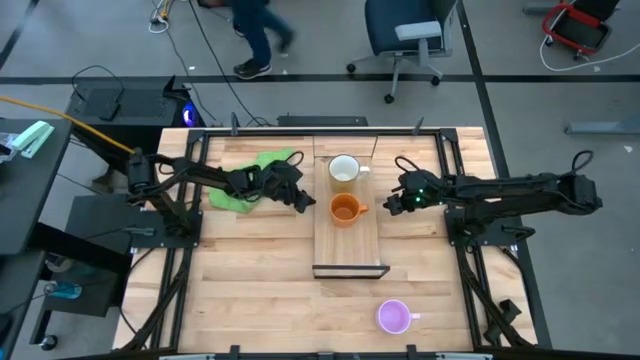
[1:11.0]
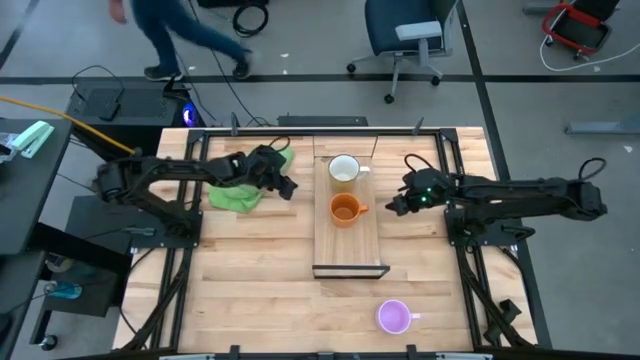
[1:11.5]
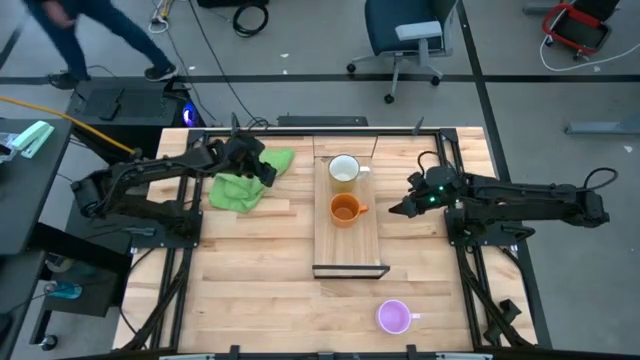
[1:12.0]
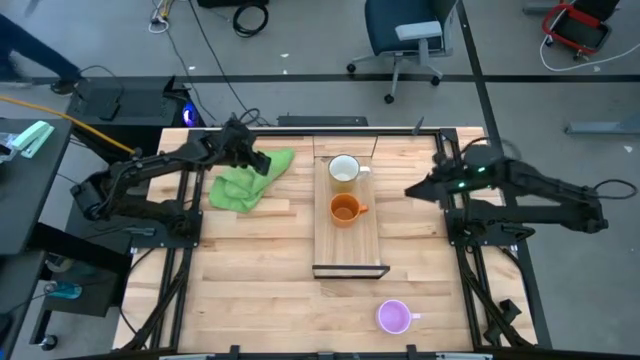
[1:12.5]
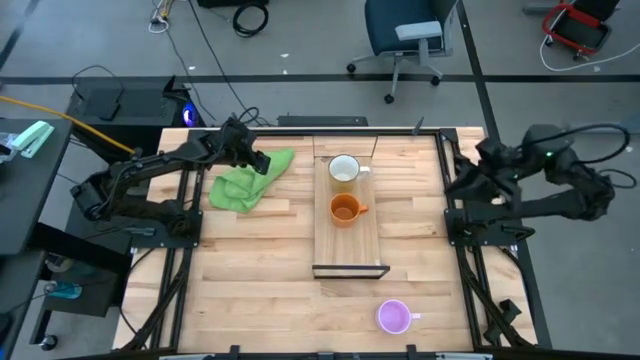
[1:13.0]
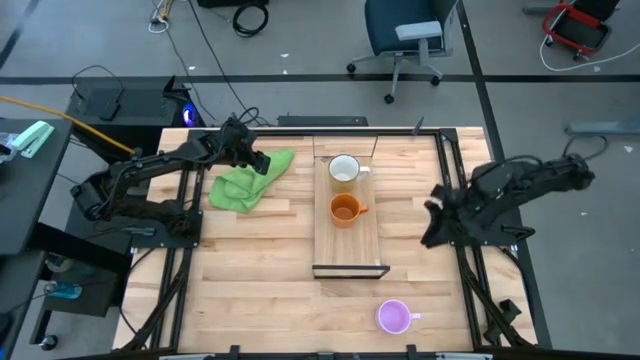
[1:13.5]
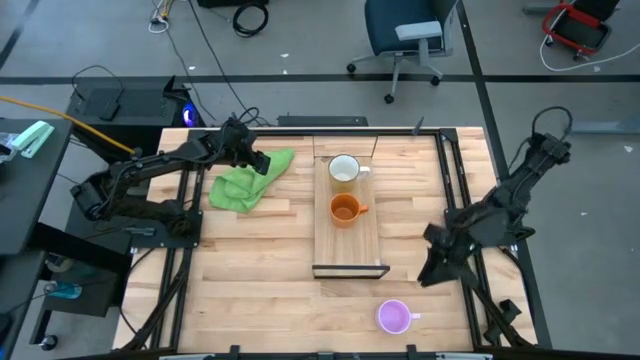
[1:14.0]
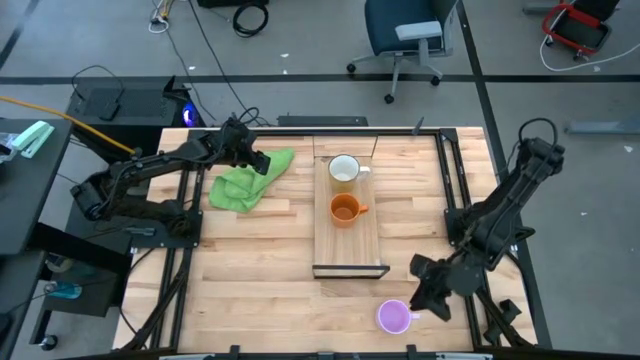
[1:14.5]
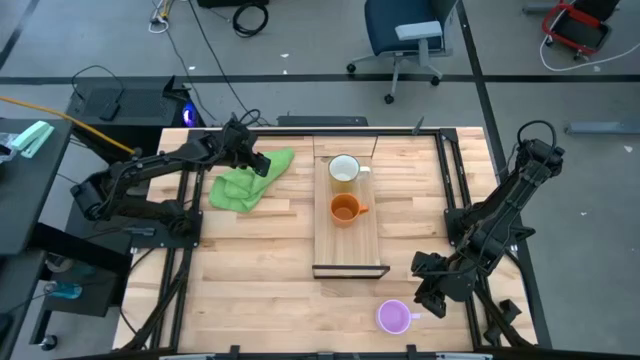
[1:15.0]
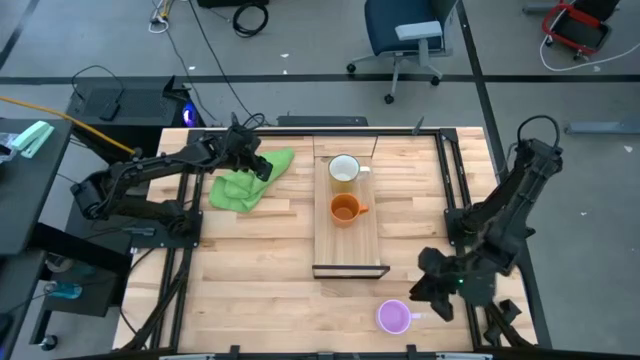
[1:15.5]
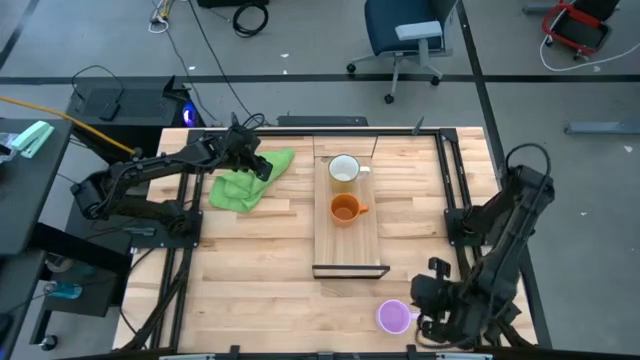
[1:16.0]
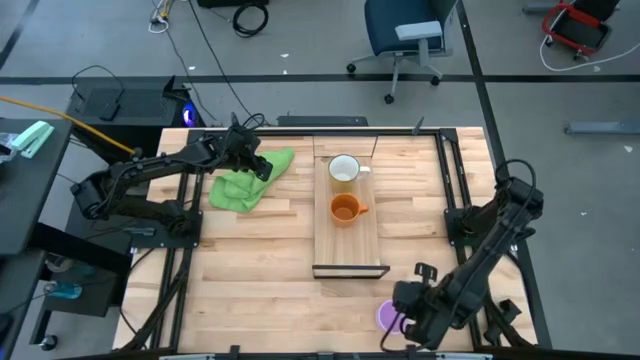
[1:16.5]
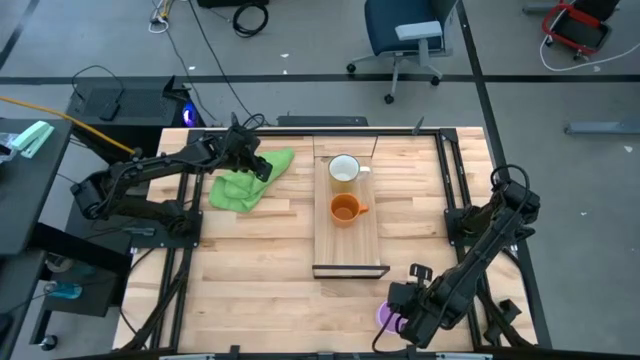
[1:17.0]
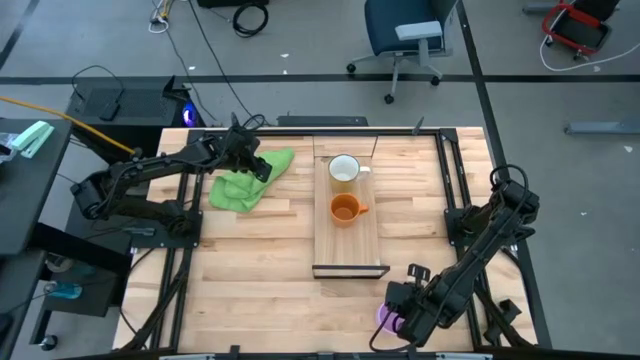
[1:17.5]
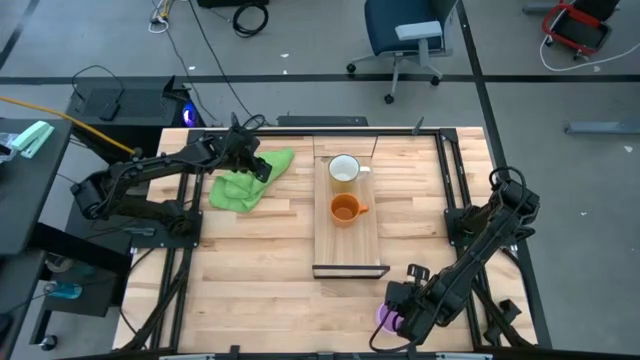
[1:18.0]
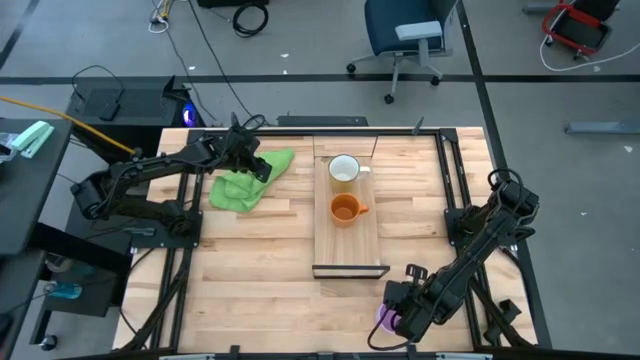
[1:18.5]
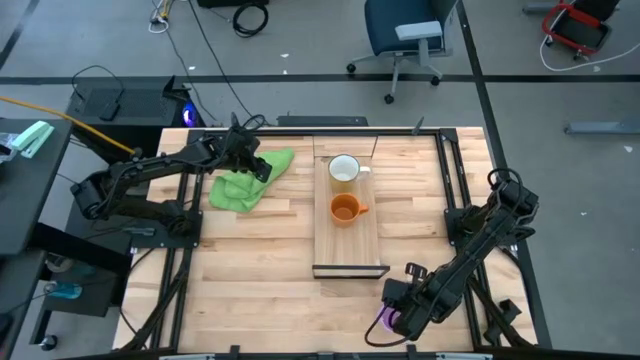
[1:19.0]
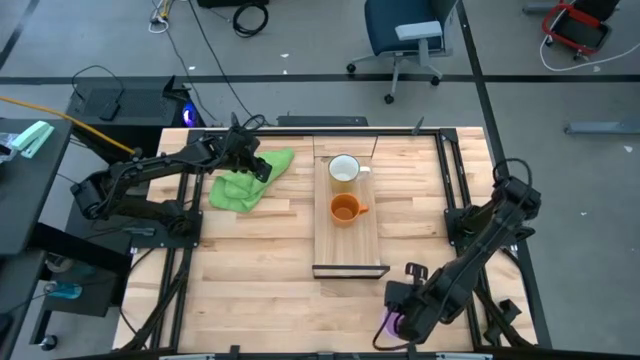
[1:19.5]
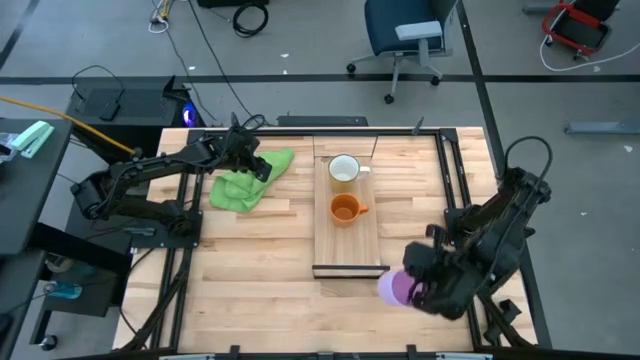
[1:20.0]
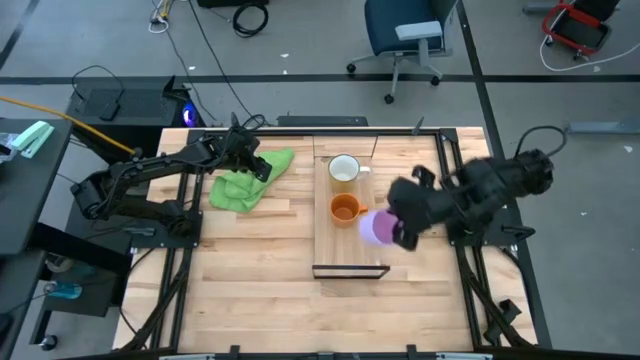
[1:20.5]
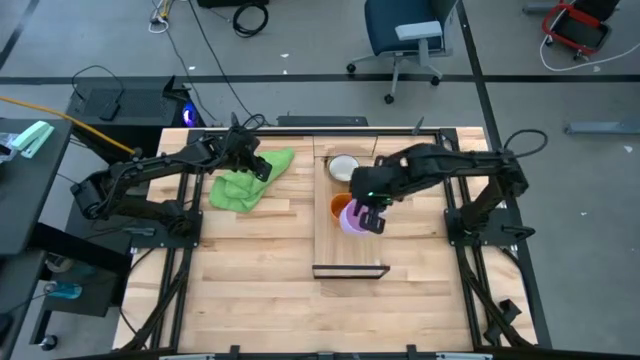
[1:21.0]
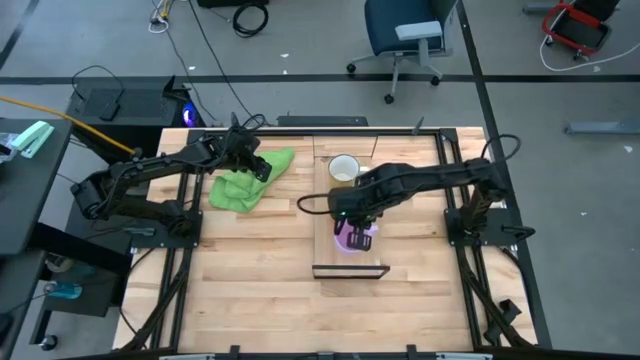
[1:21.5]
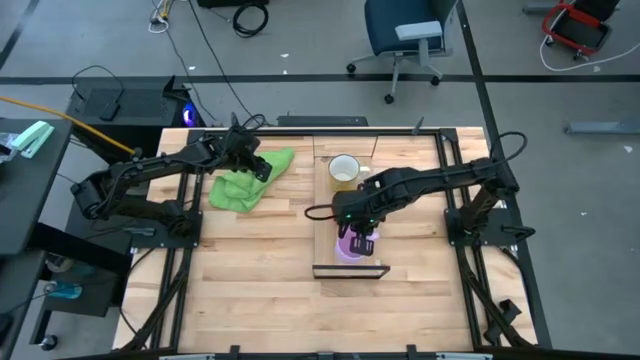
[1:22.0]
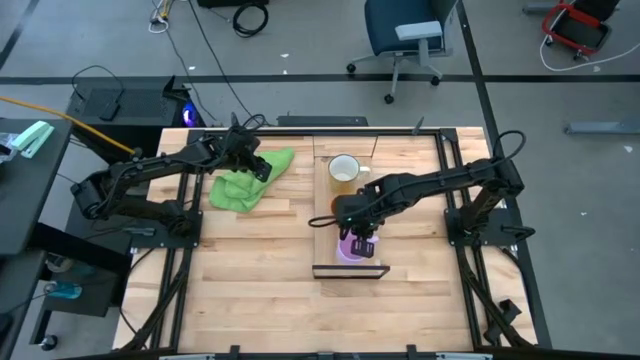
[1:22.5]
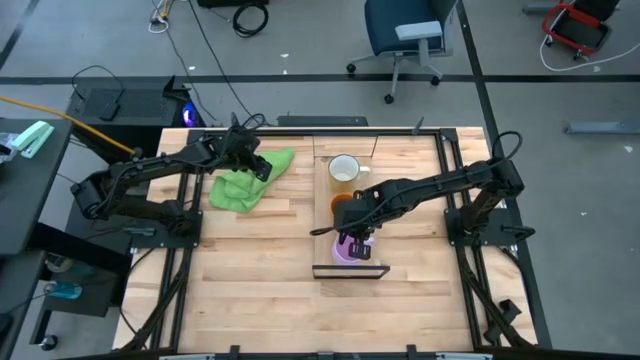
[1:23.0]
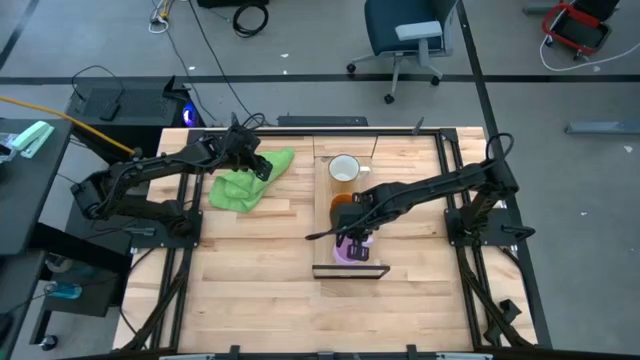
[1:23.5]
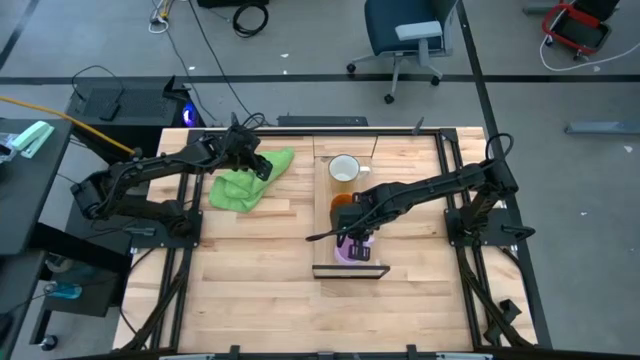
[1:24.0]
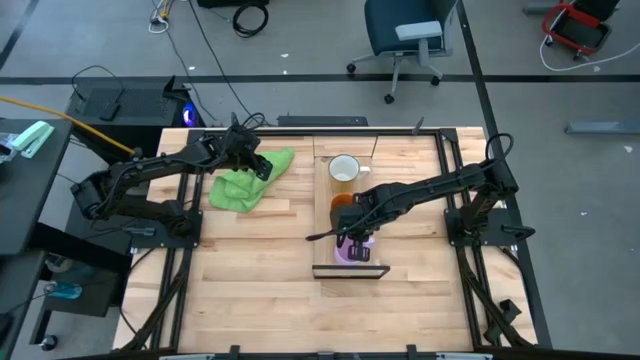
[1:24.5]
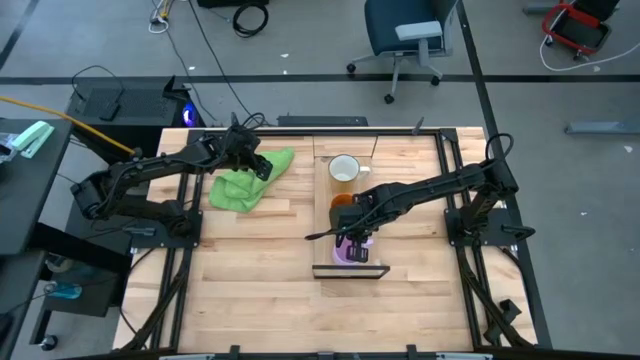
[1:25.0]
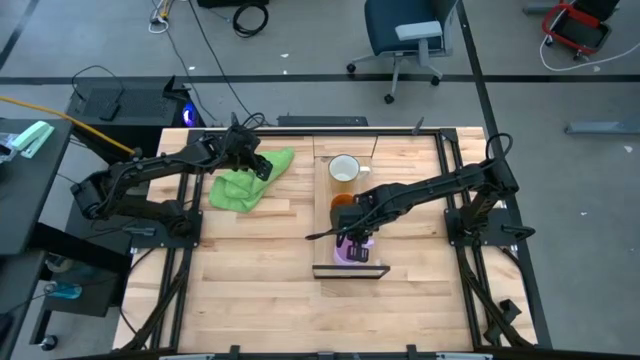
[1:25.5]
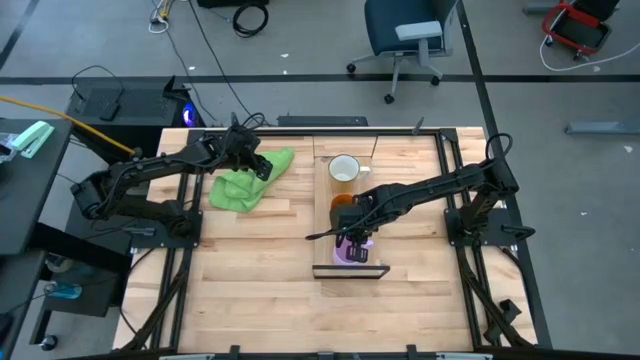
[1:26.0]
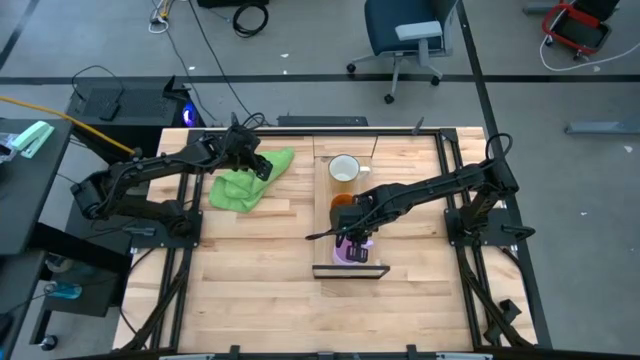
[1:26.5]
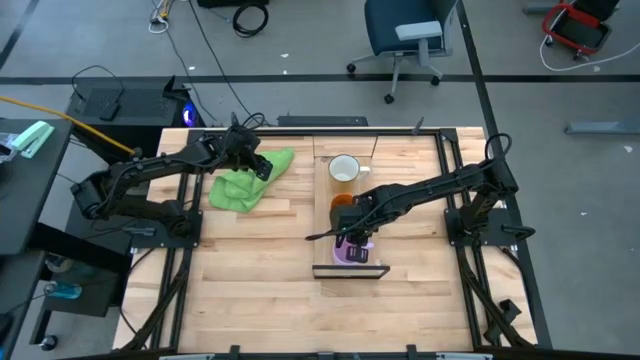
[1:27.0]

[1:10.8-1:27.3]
Task: Stack small to large cups/mugs on shelf
Put the purple mug on the shelf

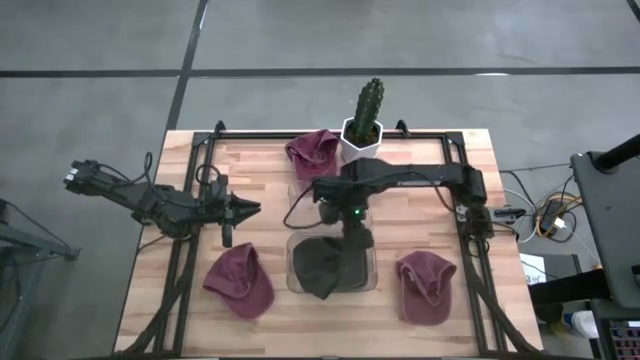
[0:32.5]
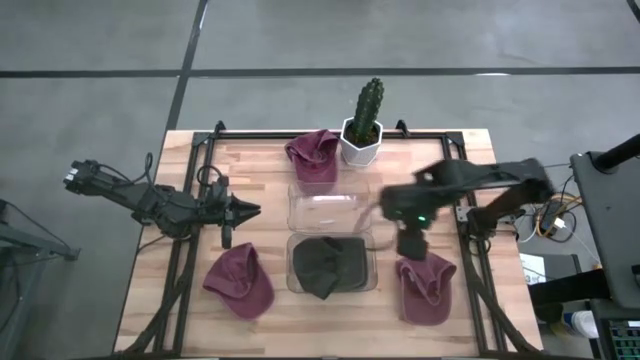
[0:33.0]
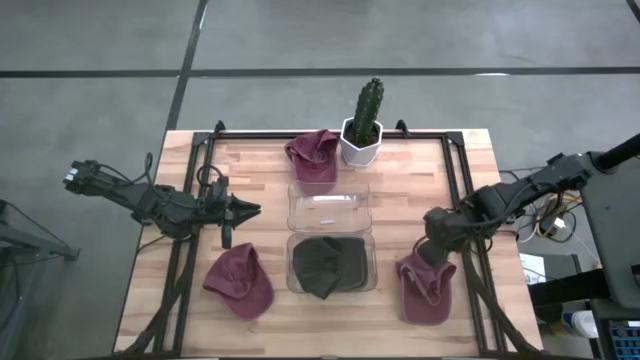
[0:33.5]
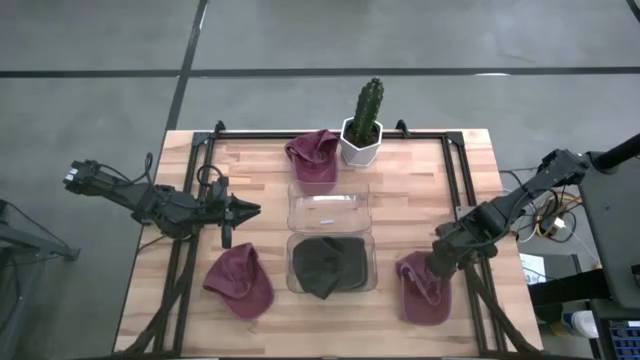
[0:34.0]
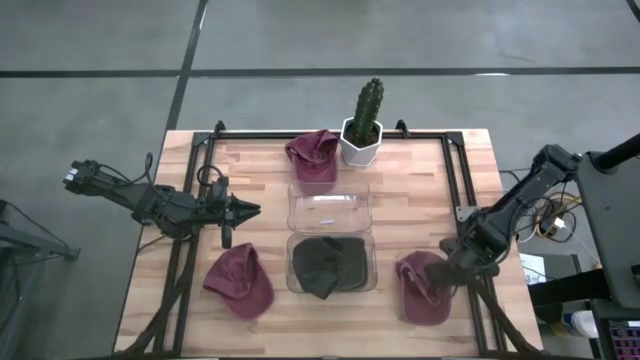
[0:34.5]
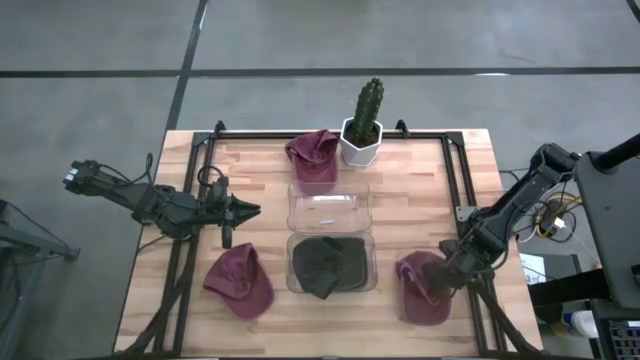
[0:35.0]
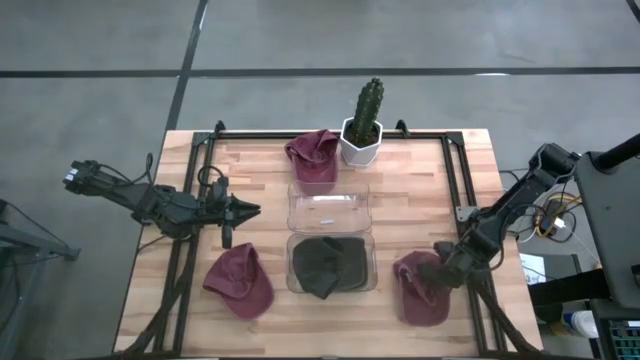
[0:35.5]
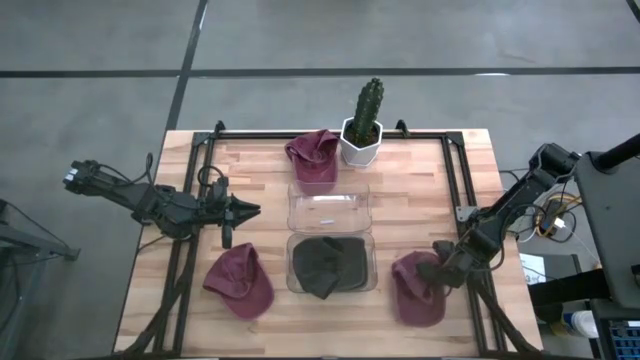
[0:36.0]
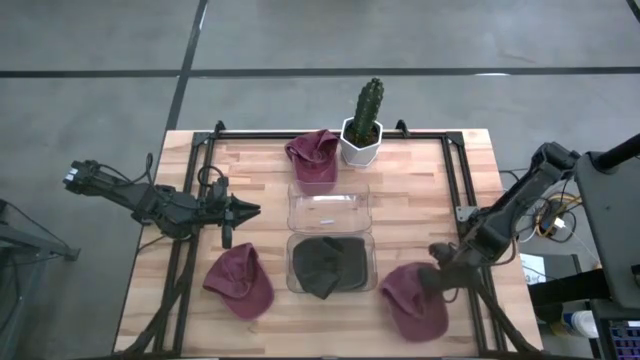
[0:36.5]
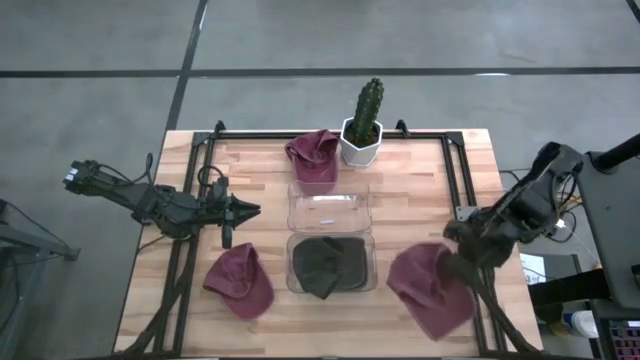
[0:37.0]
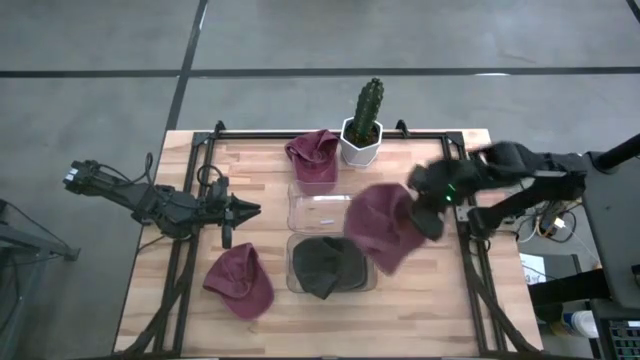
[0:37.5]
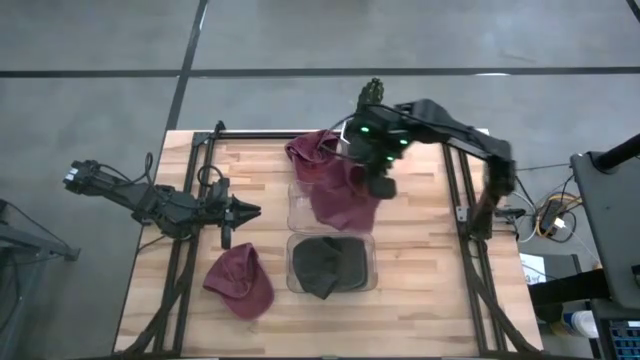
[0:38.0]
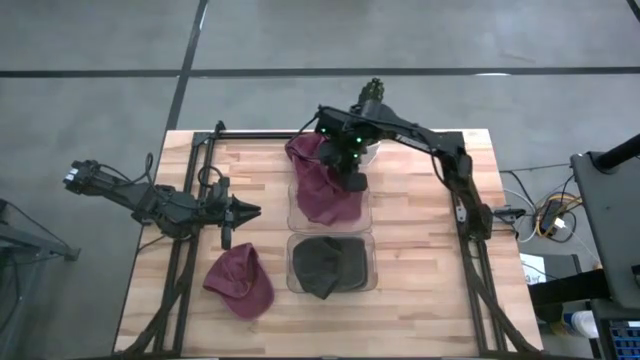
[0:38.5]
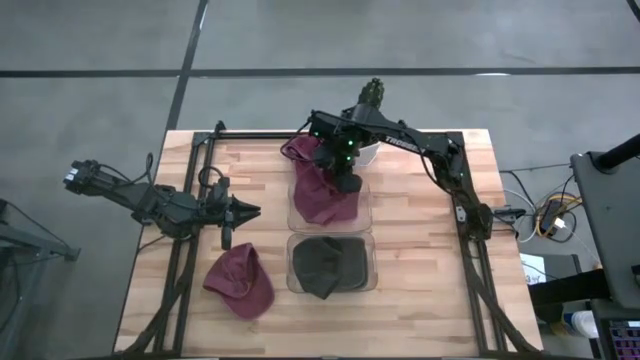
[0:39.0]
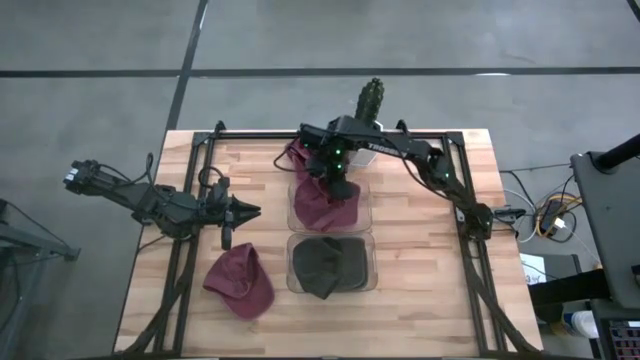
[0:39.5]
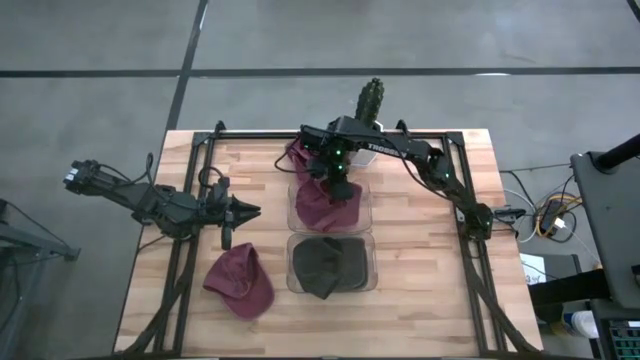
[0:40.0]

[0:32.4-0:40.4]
Task: Pick & Place hat
Put the bottom right dark red cap into the top transparent bin
